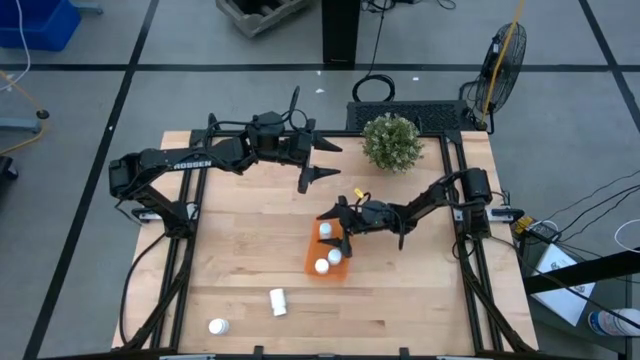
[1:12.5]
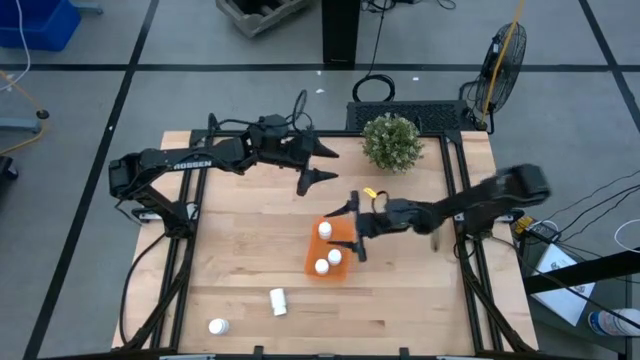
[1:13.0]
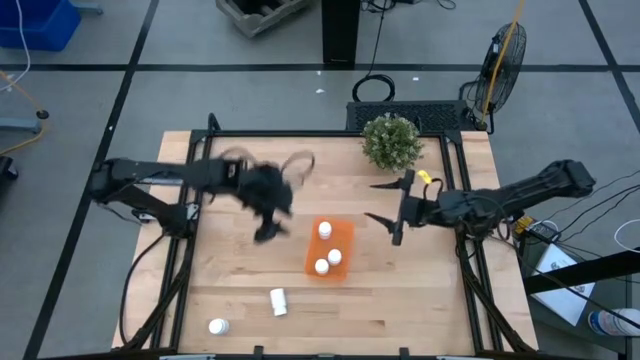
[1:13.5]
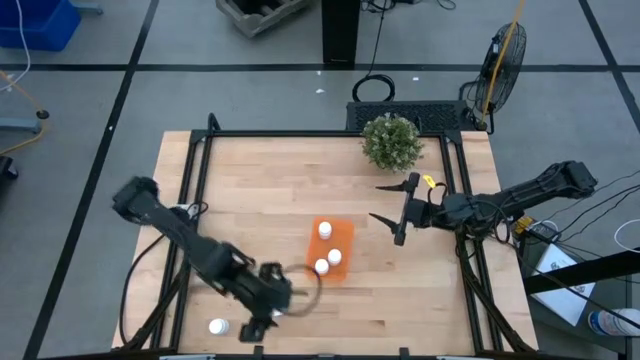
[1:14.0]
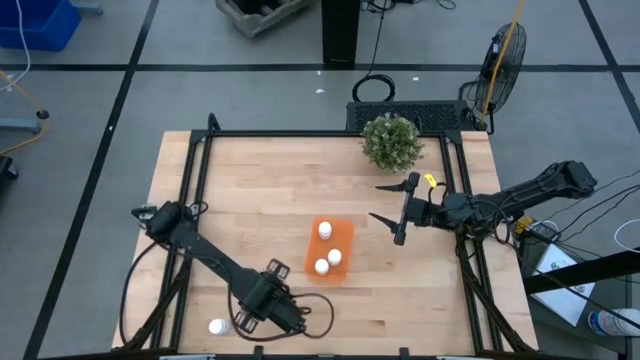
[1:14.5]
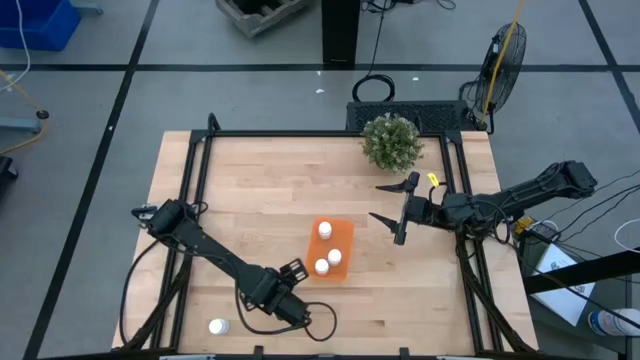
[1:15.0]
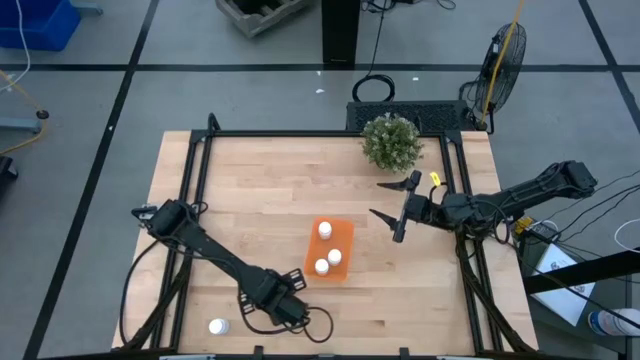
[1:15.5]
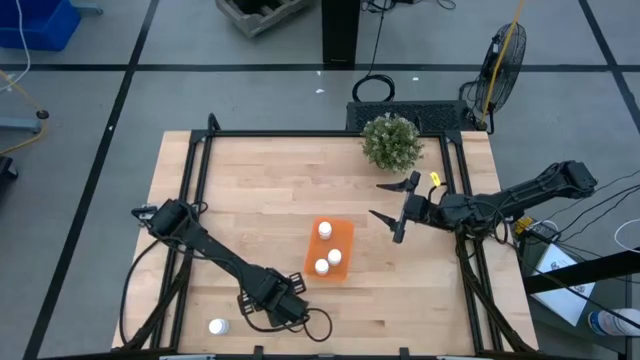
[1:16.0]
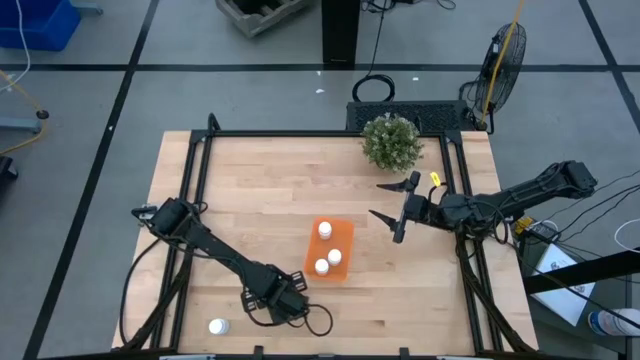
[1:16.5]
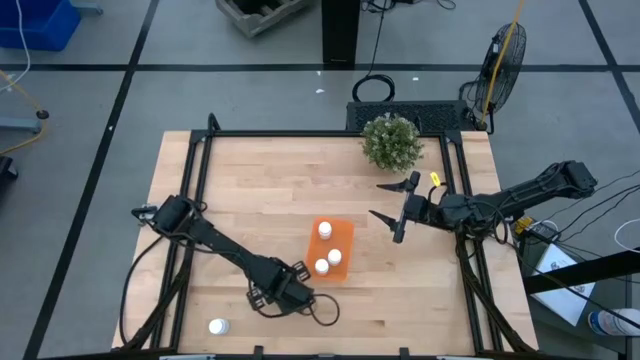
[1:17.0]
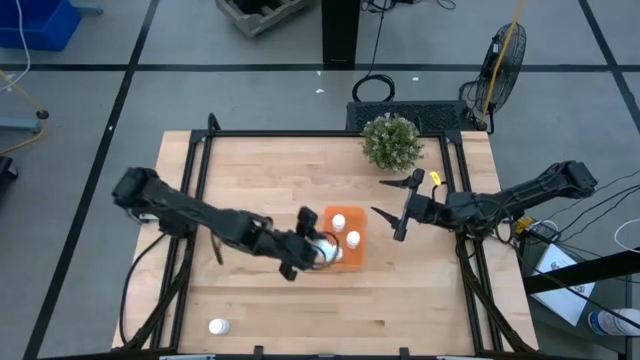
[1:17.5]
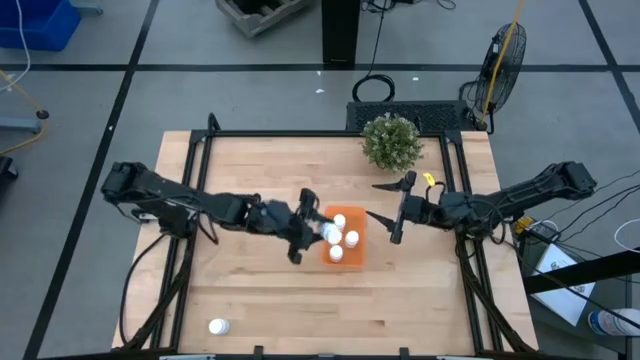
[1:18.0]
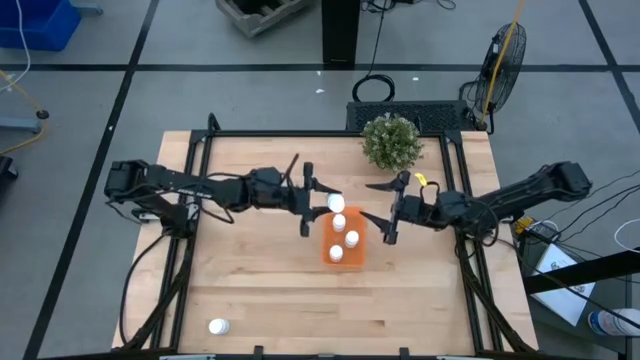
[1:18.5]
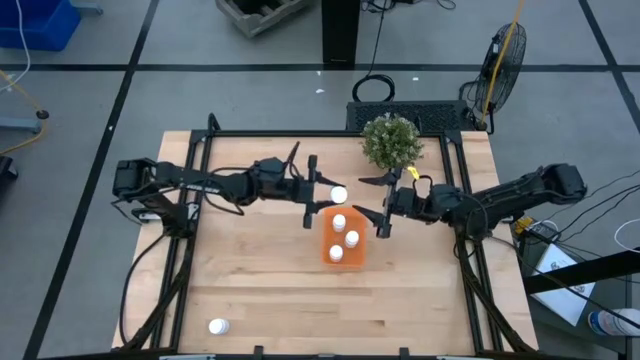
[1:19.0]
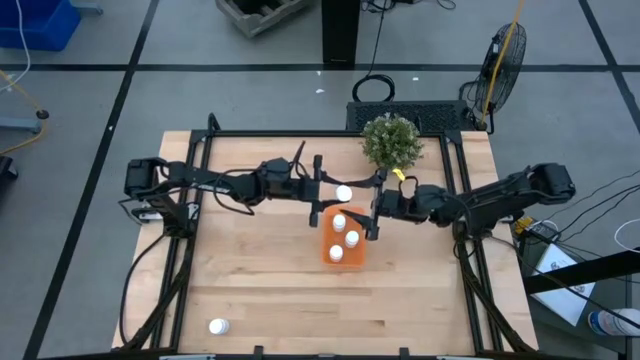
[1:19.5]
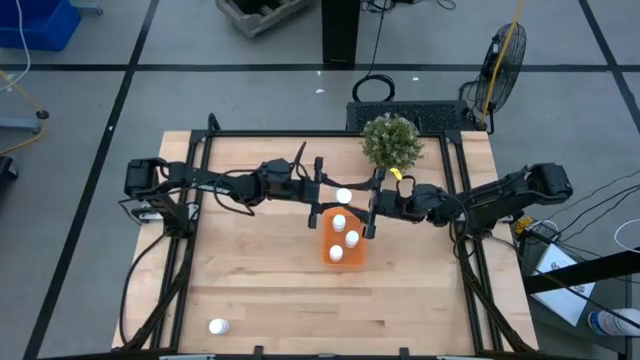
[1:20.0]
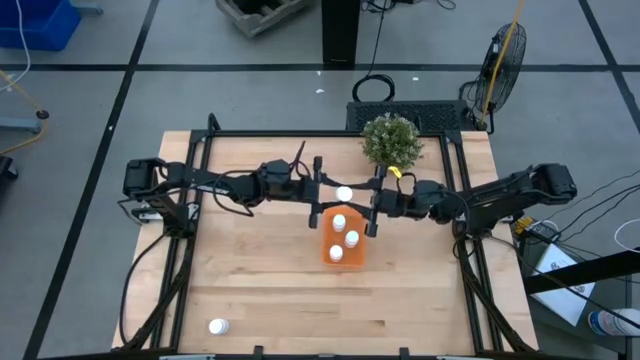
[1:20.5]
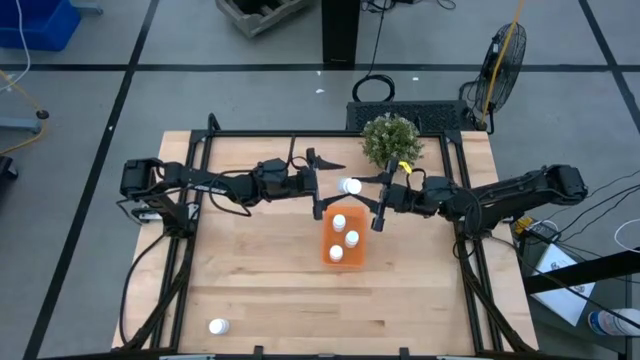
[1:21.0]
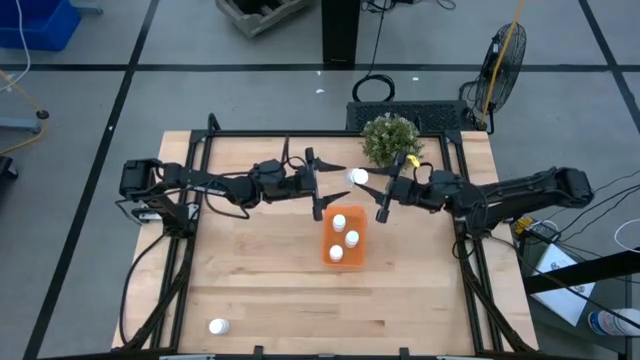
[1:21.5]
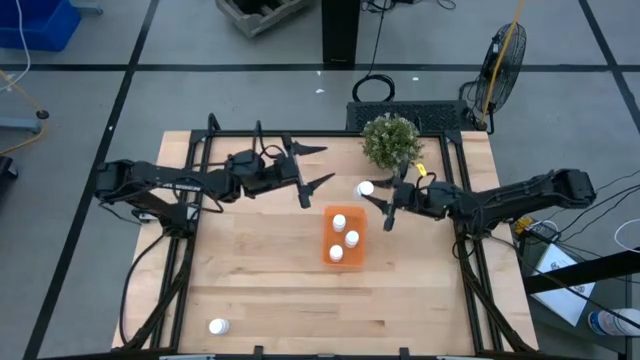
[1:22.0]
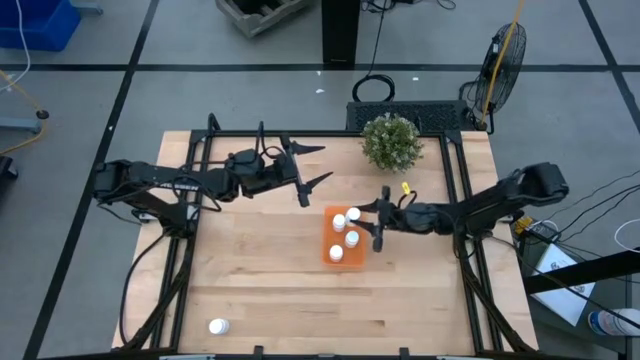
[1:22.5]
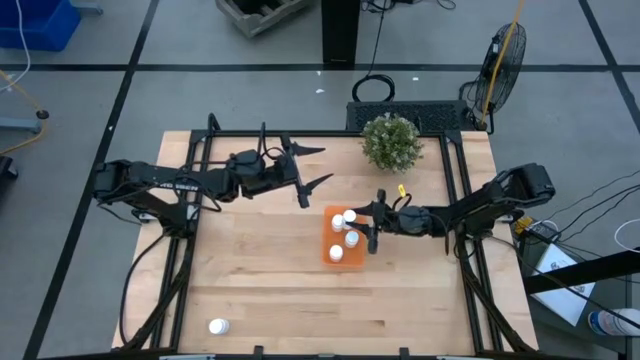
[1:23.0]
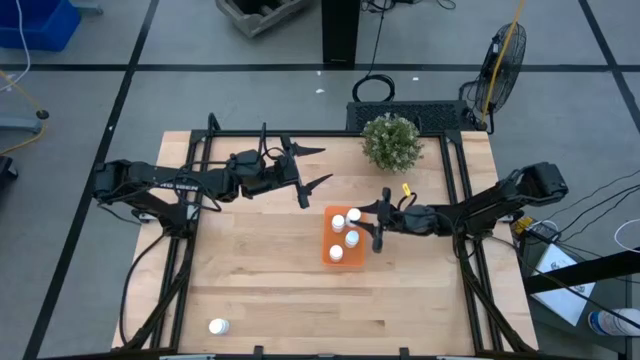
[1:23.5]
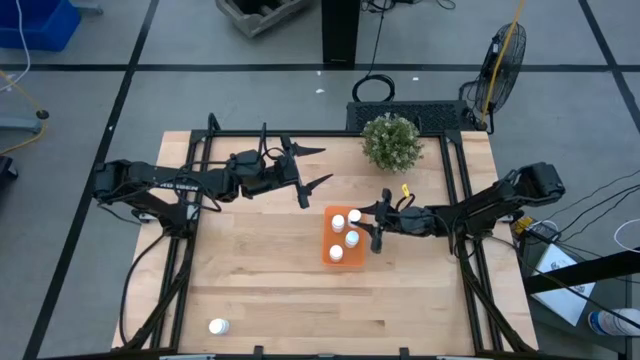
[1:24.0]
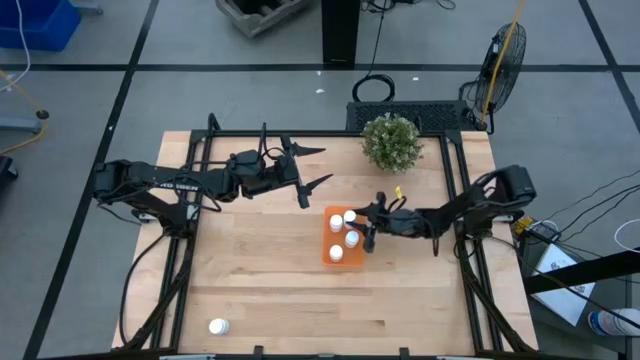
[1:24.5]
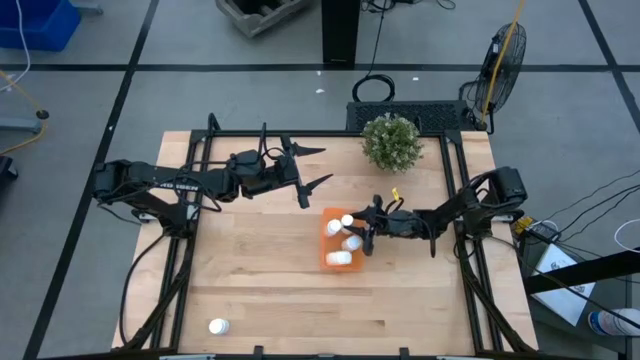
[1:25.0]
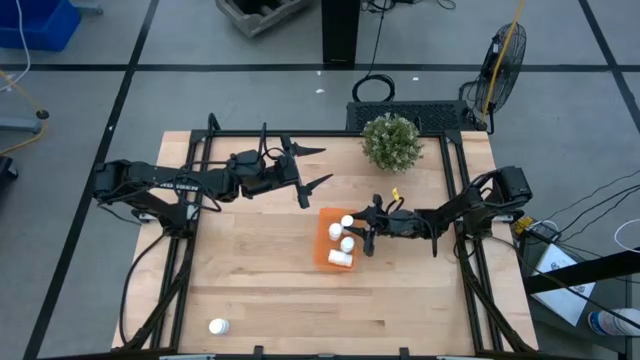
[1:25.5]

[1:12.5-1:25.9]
Task: Pick and place pill bottles into a basket
Put the white pill bottle into the orange container

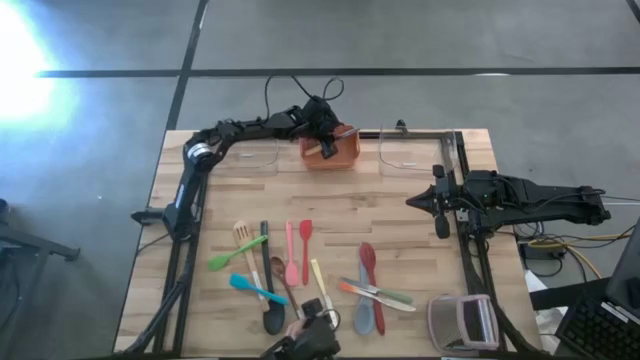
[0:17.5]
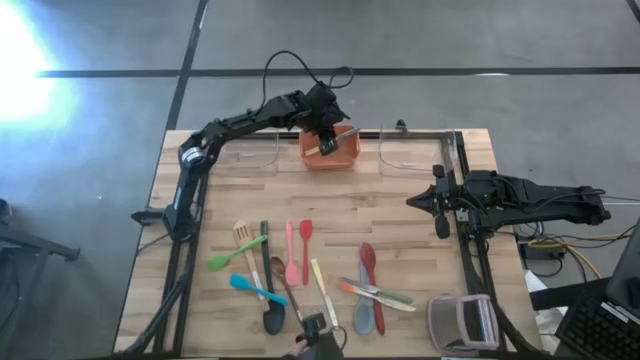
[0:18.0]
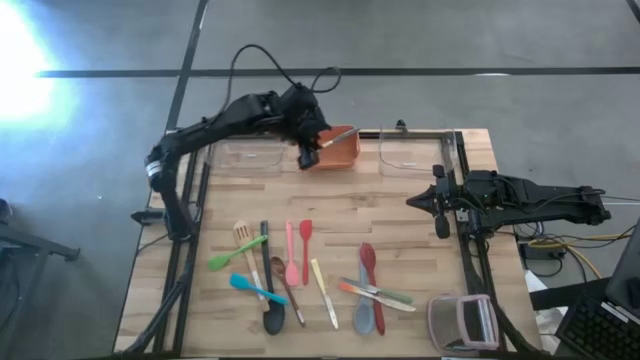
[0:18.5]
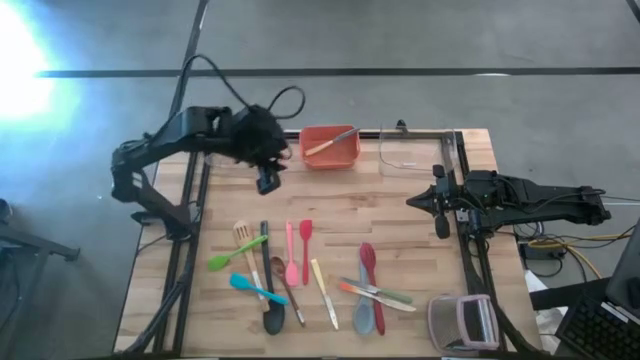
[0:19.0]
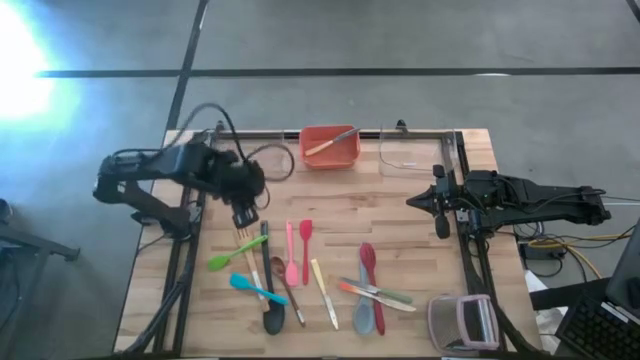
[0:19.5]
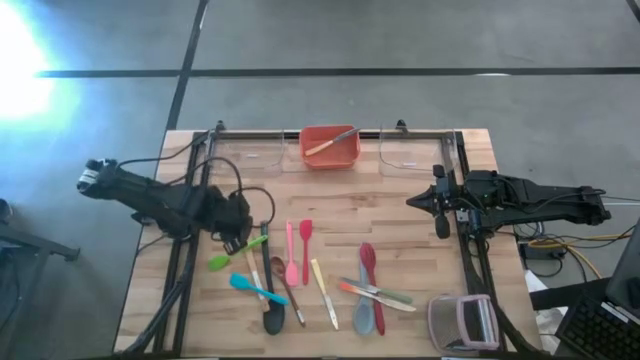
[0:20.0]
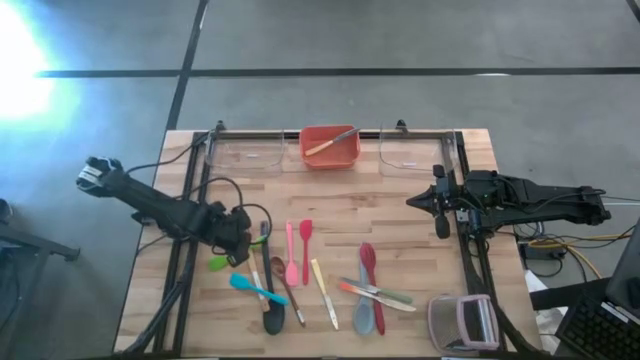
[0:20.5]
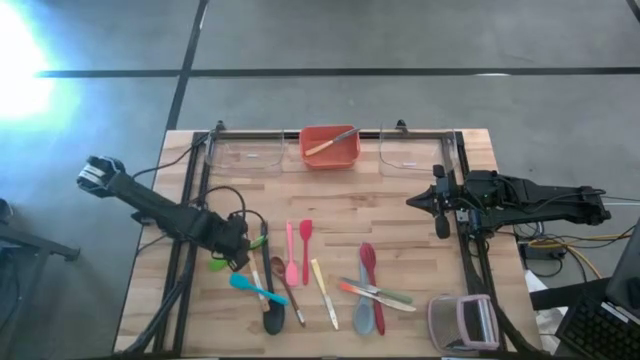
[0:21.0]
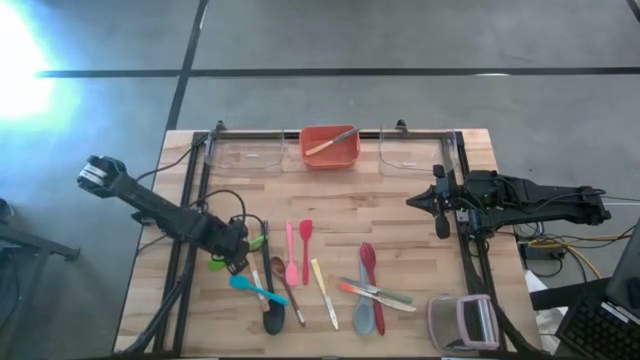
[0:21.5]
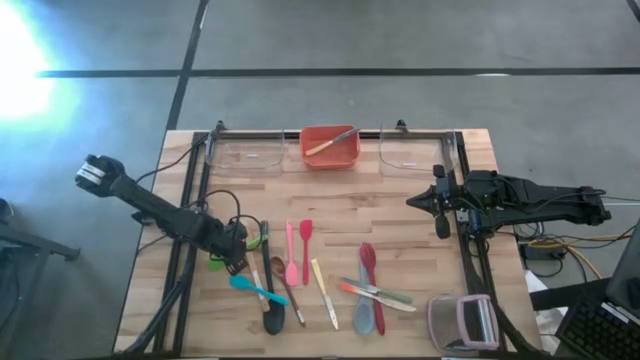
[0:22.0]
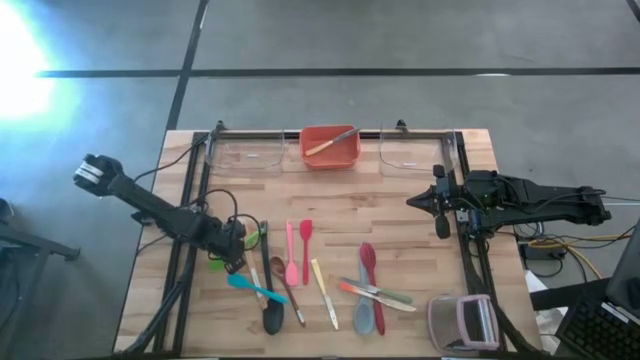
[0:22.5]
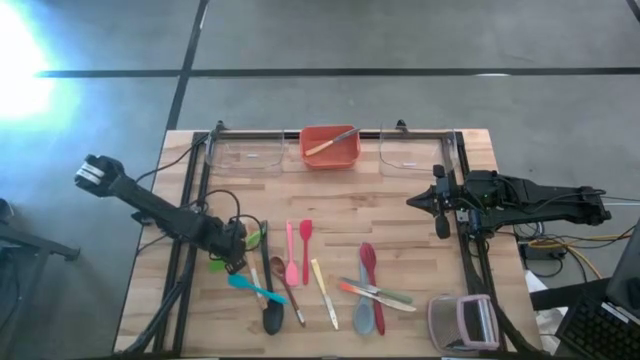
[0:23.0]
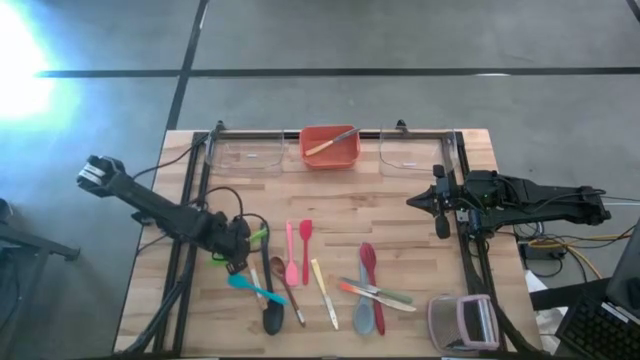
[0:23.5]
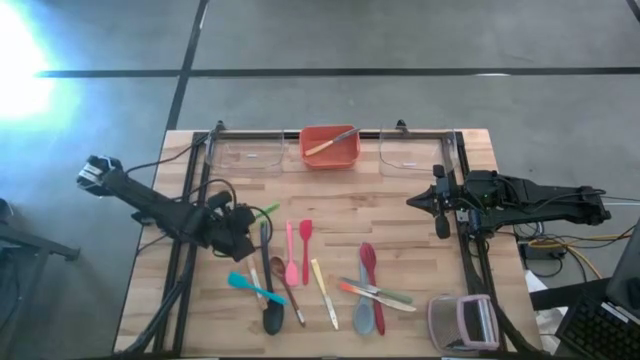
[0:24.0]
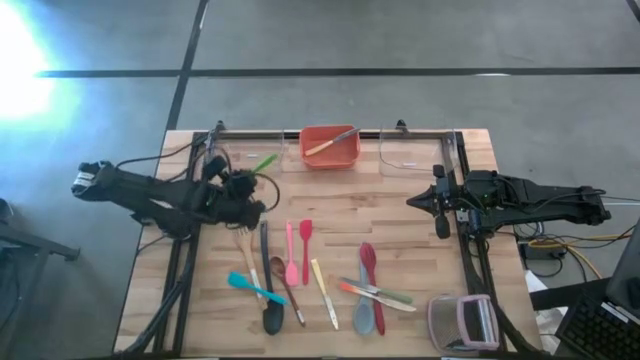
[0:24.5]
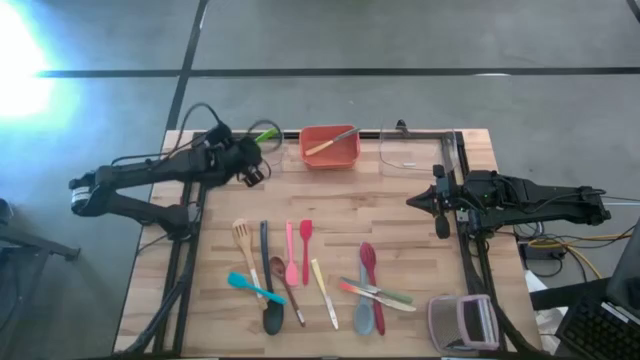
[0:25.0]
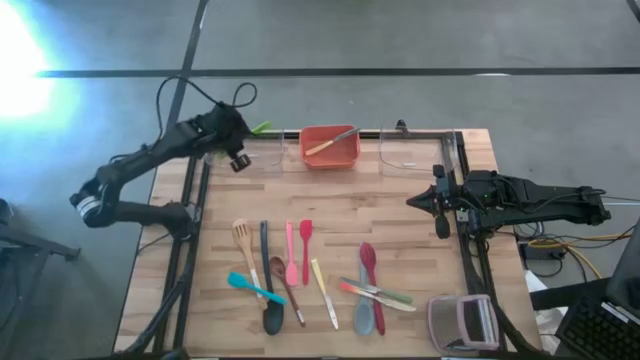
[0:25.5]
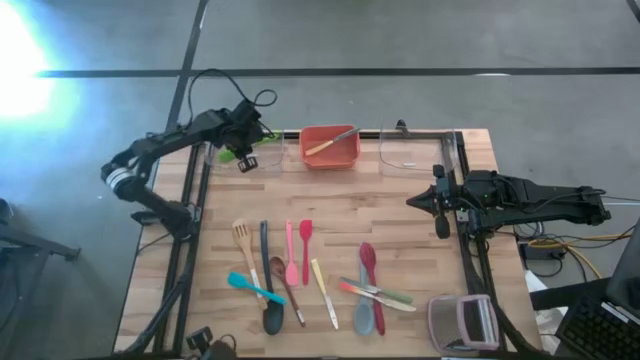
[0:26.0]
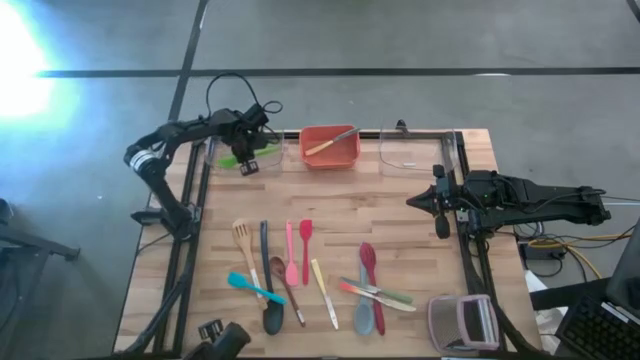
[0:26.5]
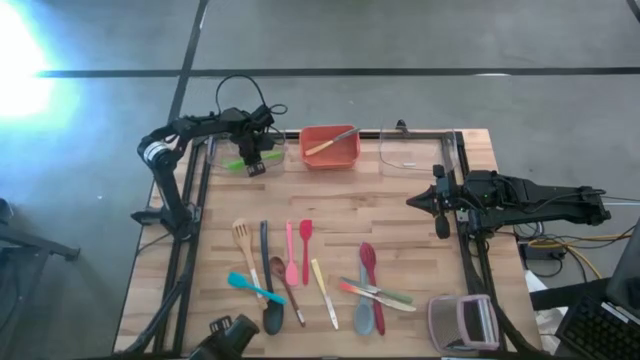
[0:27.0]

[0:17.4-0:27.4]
Task: Pick & Place Kitchen Items
Put the green spatula into the left transparent bin
